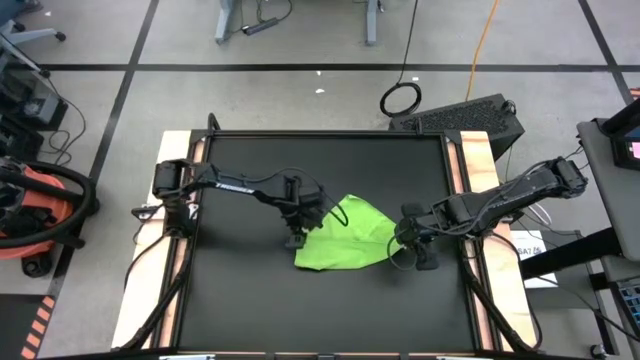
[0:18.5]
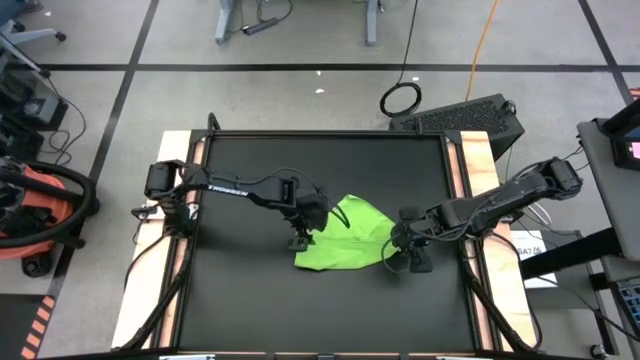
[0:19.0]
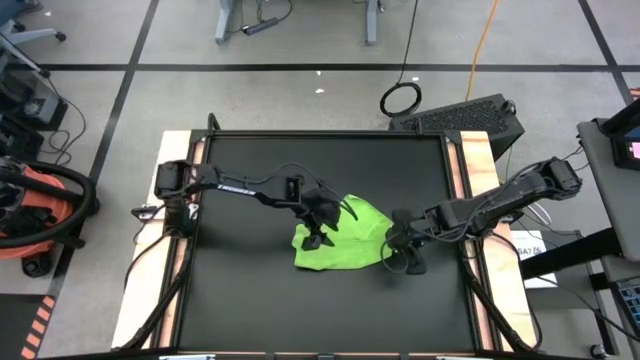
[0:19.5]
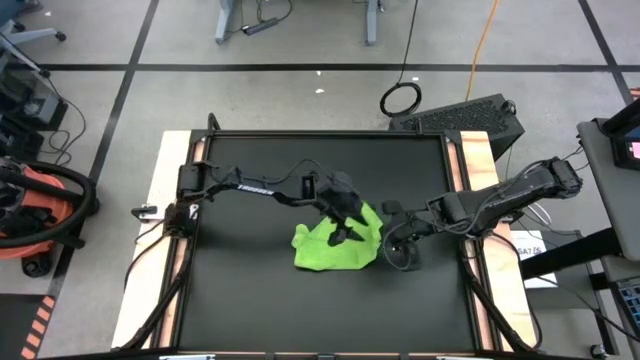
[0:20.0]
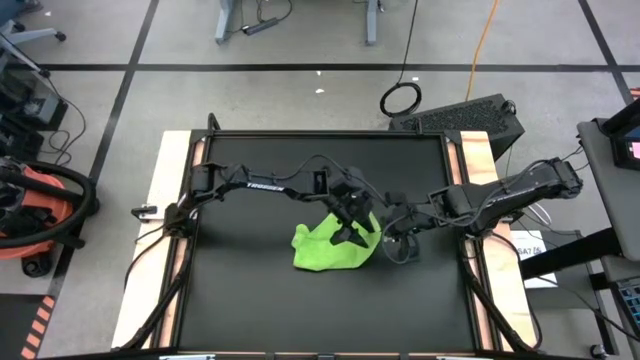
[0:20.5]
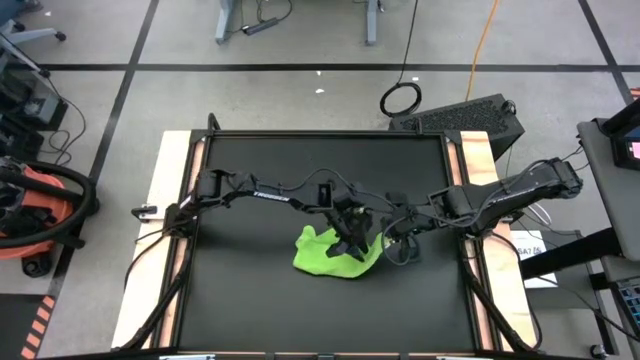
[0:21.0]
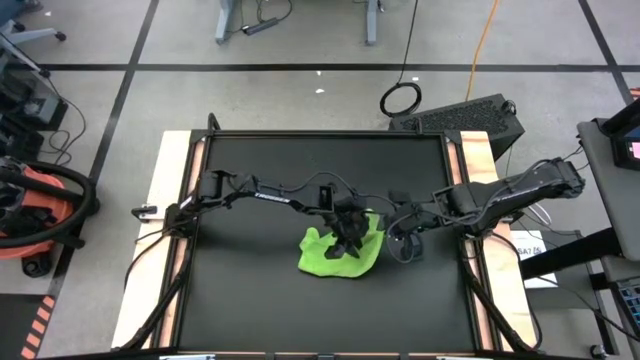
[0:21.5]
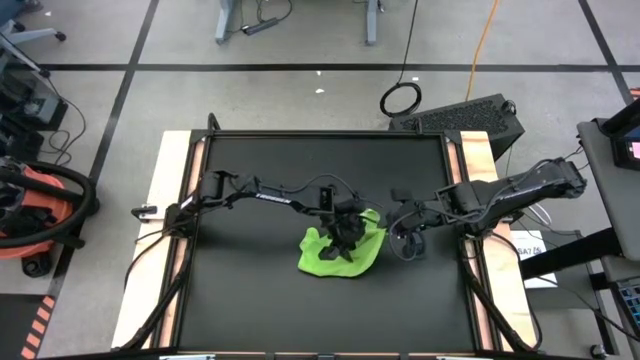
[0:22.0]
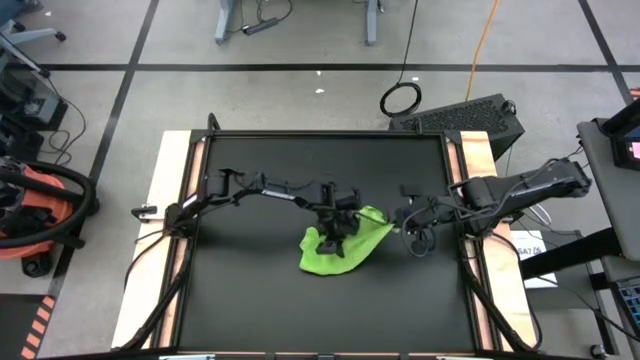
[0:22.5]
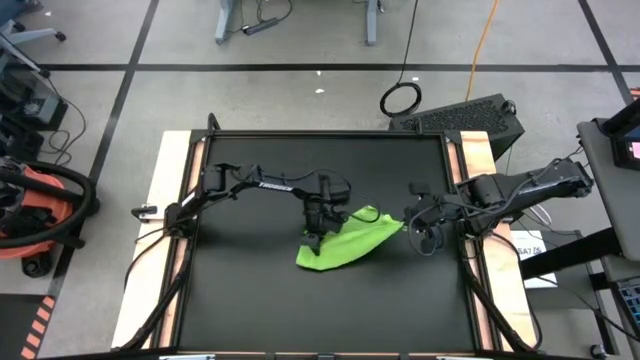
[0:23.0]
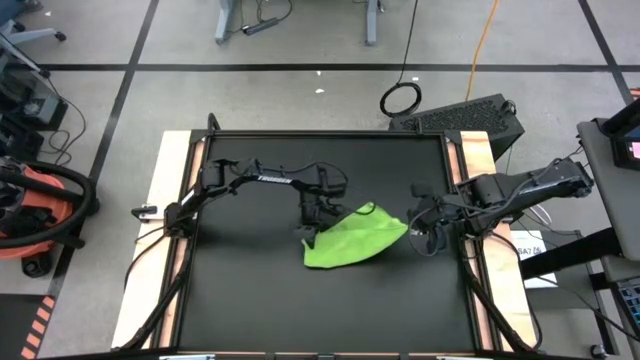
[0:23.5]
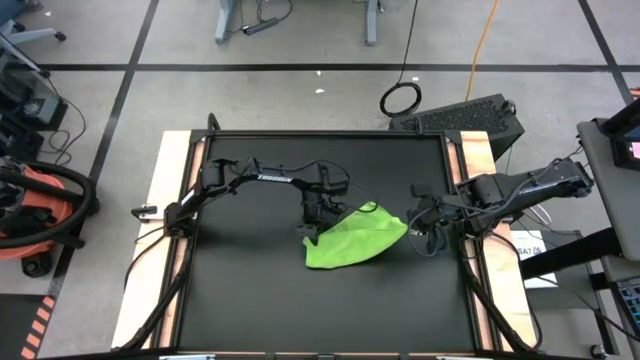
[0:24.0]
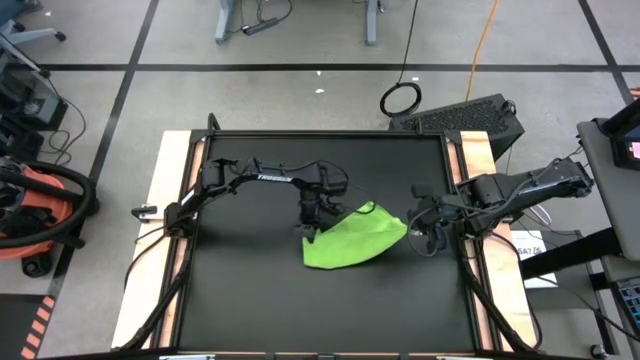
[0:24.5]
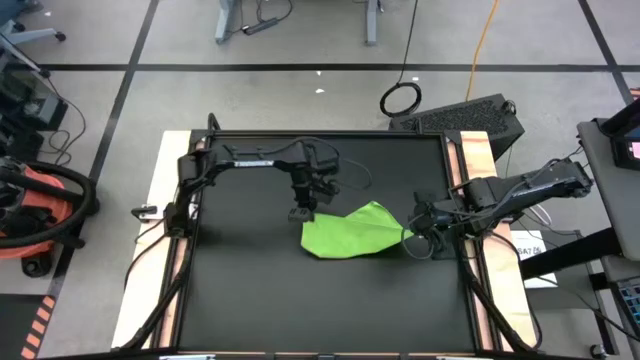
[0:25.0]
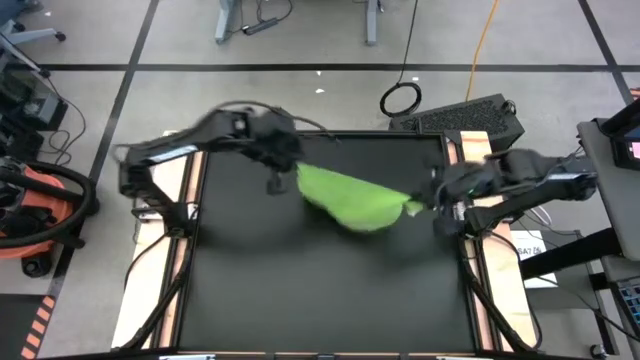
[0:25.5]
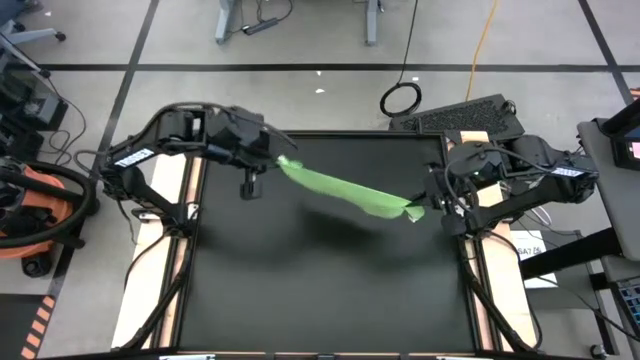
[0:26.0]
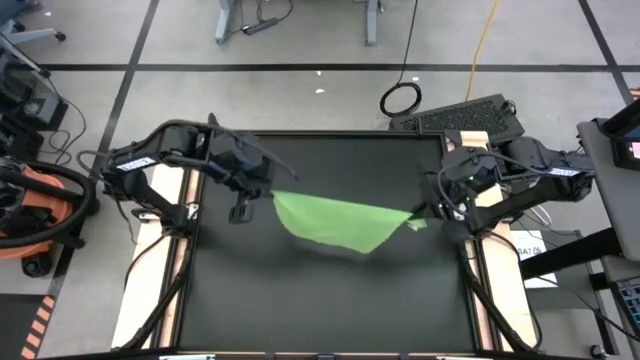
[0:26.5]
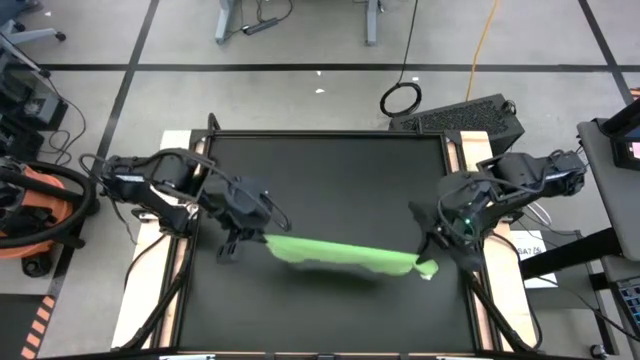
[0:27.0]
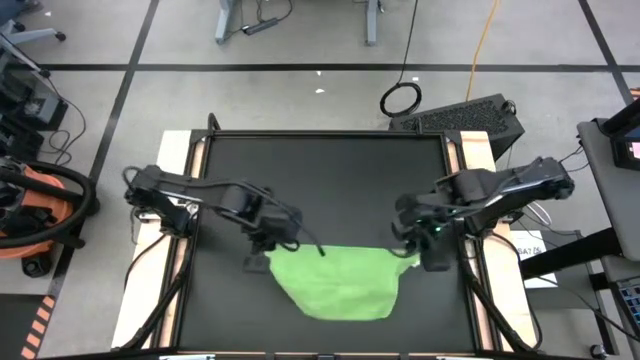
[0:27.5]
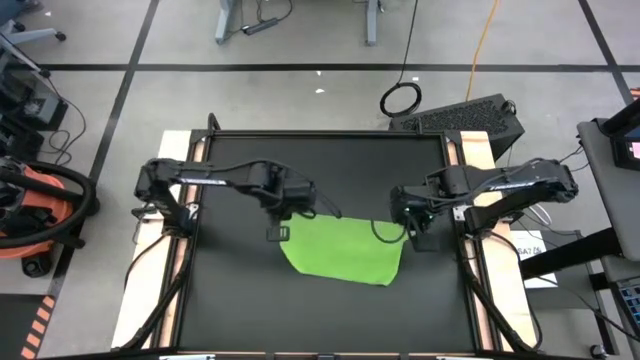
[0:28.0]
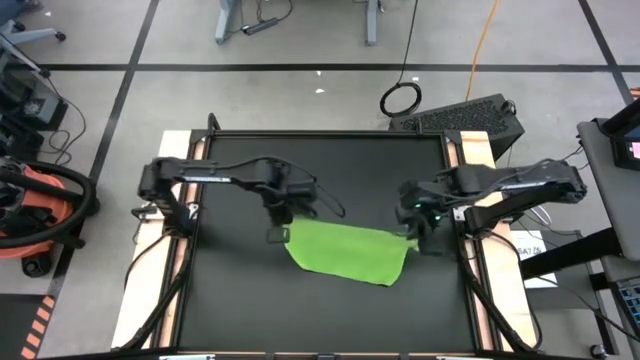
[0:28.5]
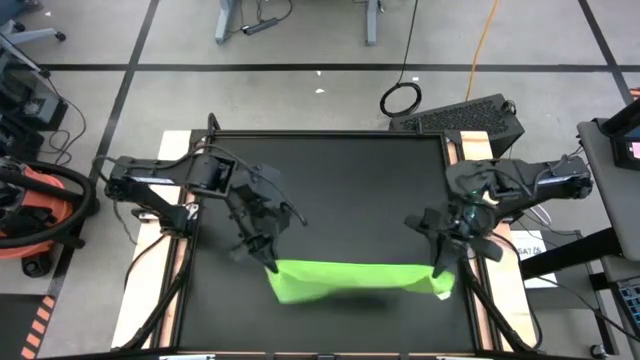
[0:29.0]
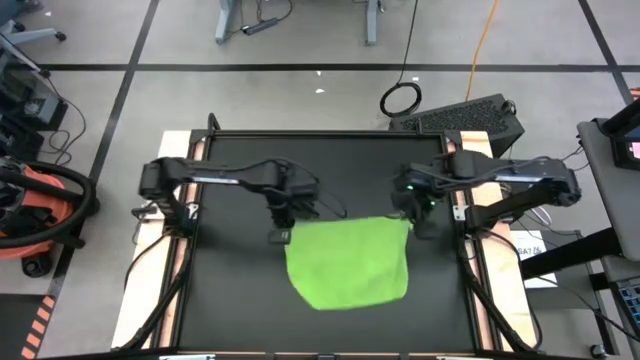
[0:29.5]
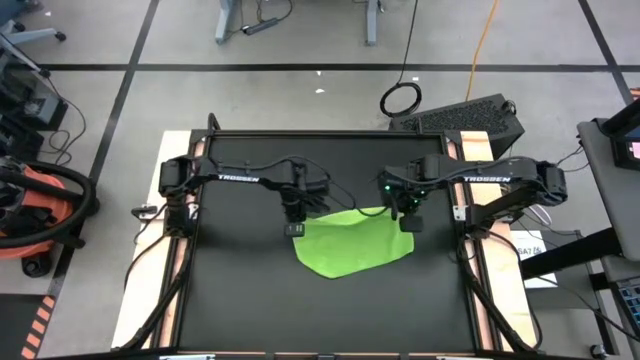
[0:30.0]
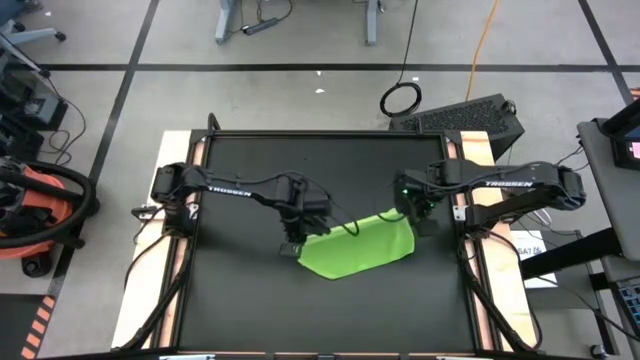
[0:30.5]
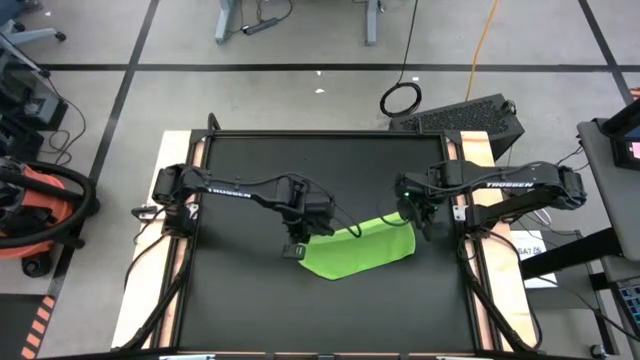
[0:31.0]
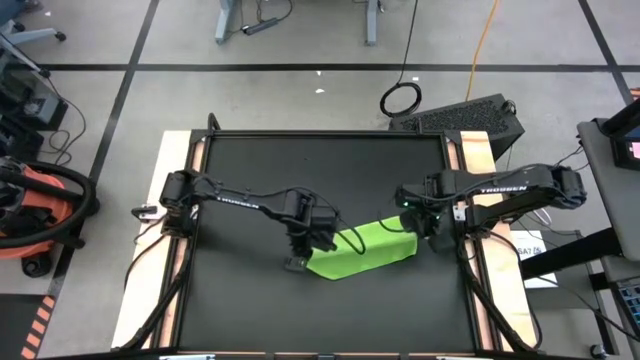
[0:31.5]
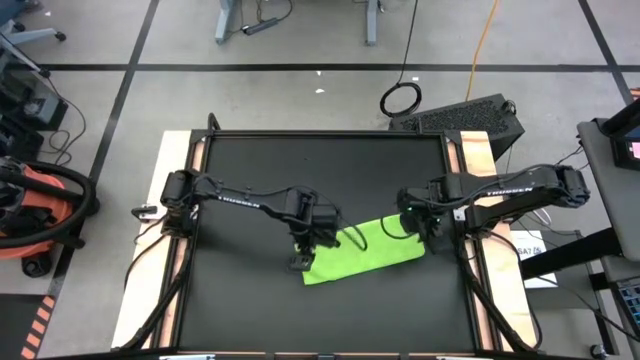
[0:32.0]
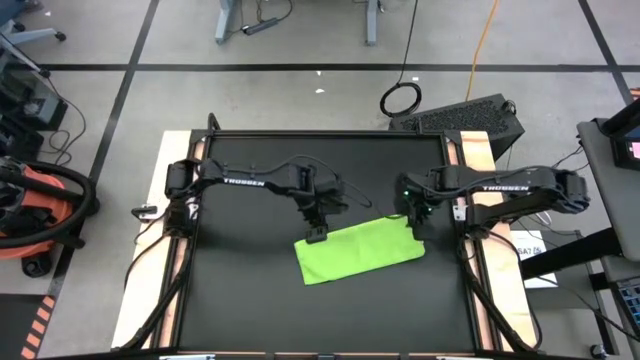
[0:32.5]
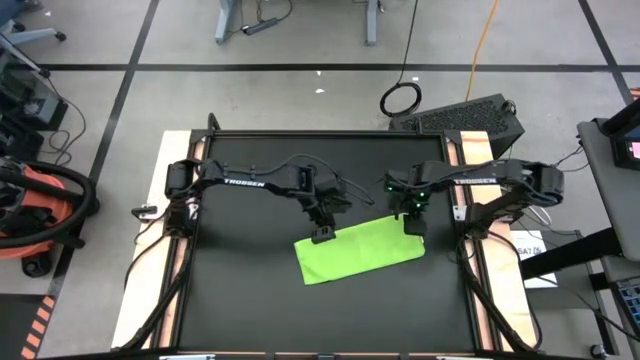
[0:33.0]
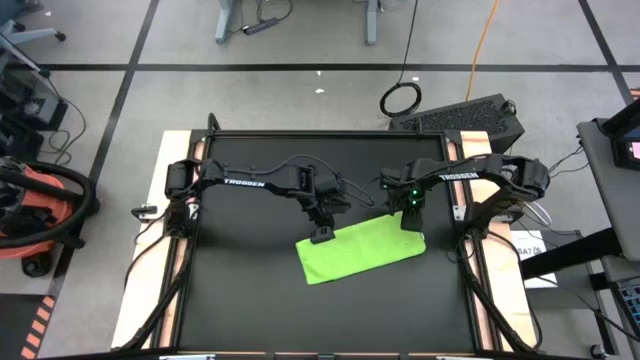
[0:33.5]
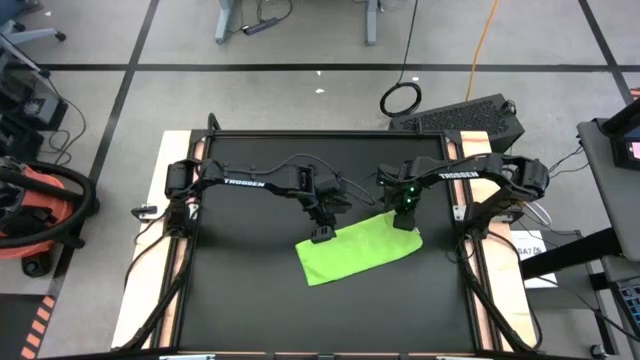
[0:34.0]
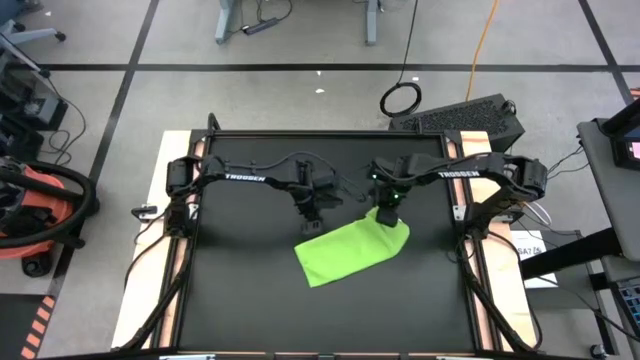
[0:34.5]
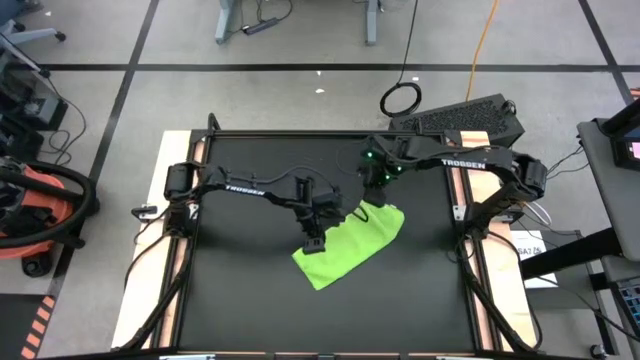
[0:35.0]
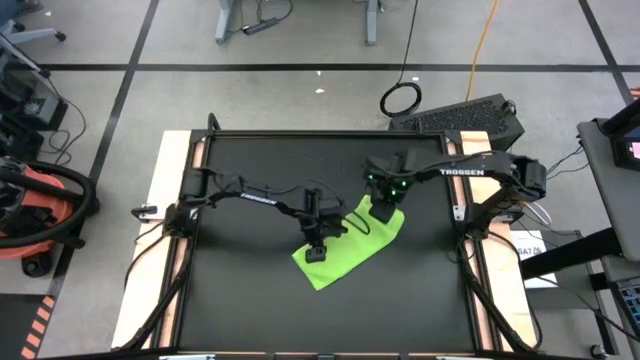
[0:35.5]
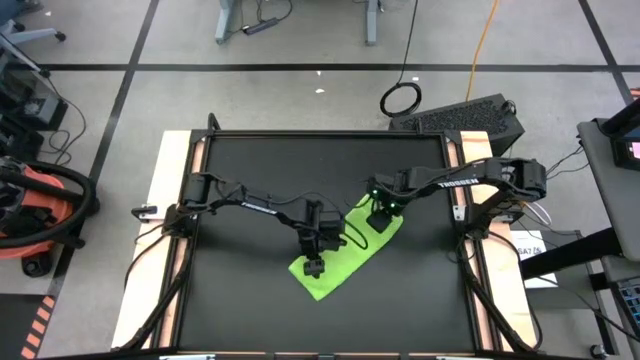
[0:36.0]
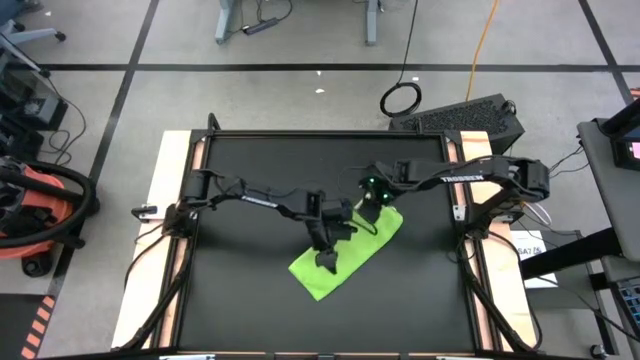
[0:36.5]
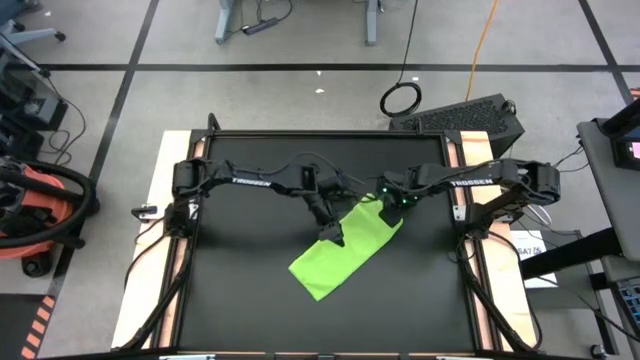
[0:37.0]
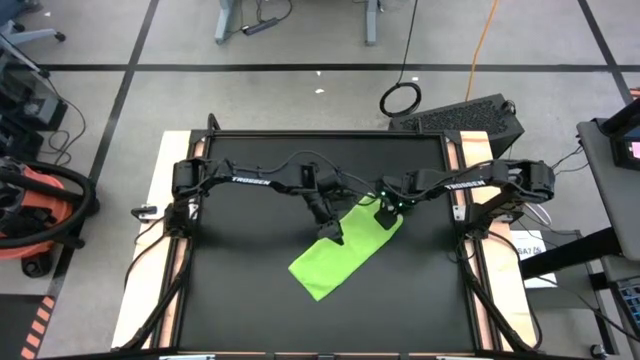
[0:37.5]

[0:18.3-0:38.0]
Task: Roll towel
Roll the green microfiber towel
